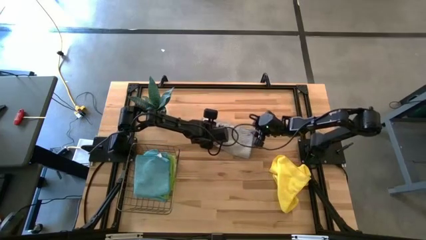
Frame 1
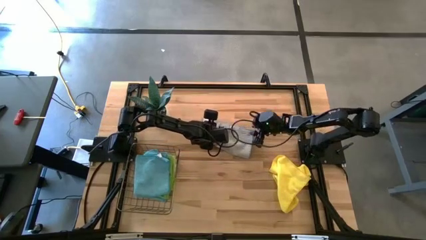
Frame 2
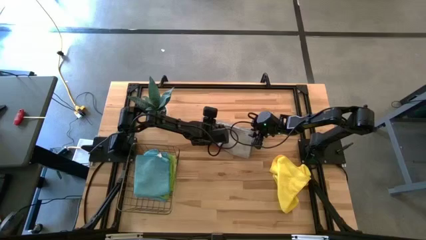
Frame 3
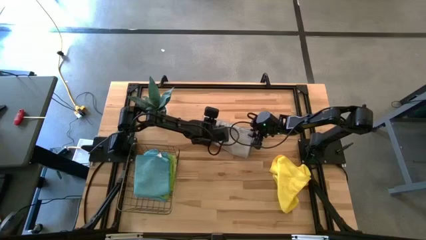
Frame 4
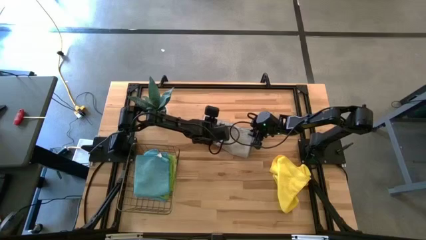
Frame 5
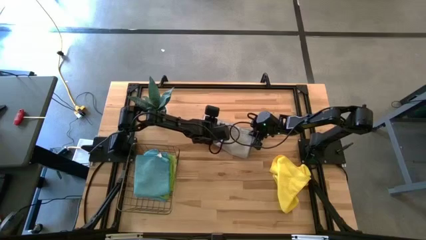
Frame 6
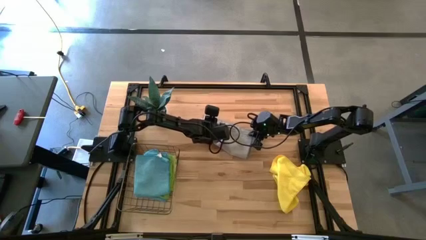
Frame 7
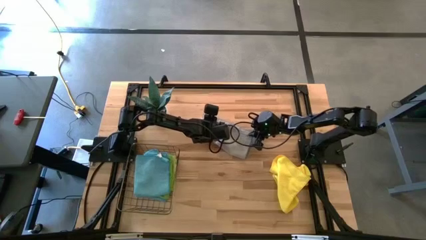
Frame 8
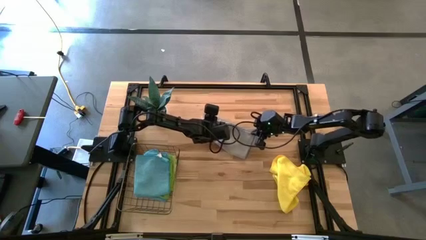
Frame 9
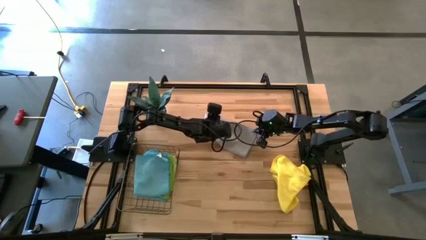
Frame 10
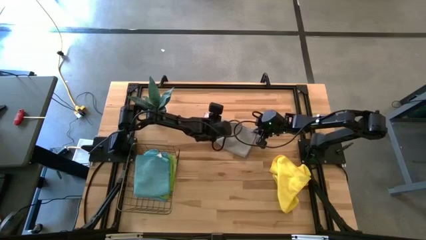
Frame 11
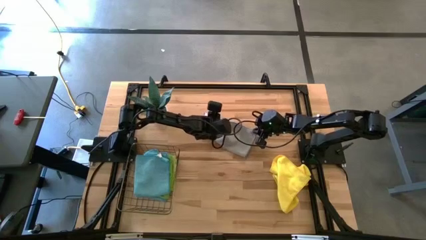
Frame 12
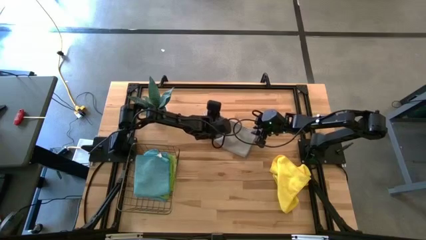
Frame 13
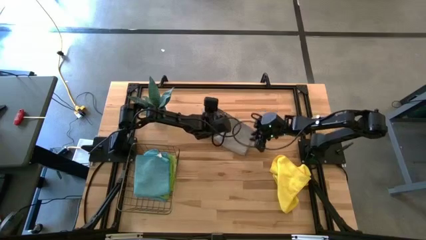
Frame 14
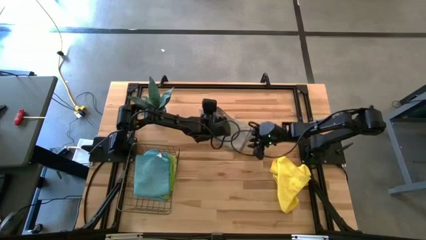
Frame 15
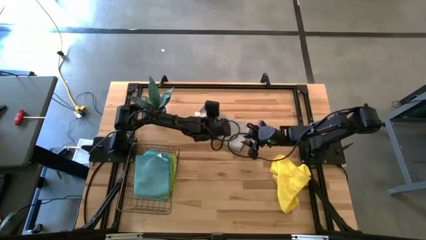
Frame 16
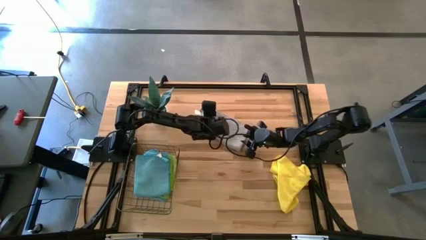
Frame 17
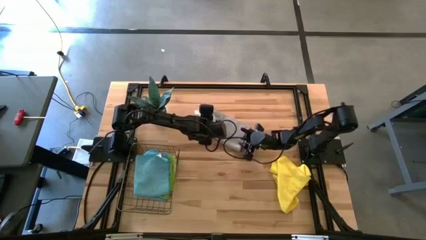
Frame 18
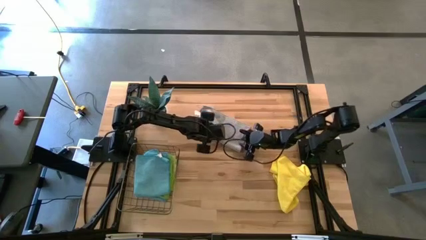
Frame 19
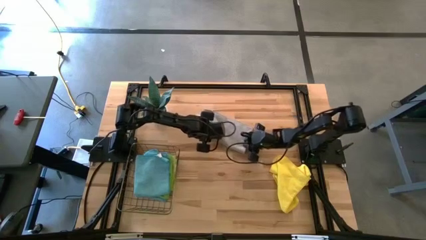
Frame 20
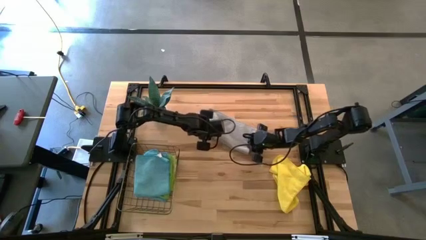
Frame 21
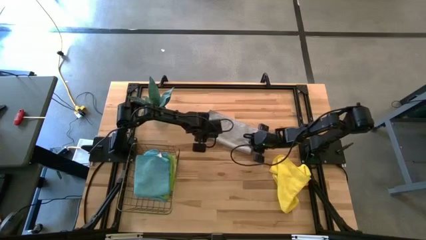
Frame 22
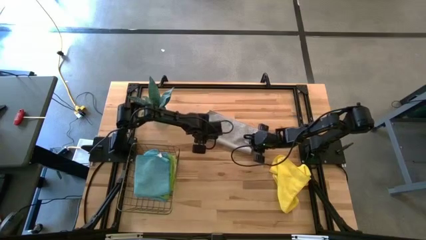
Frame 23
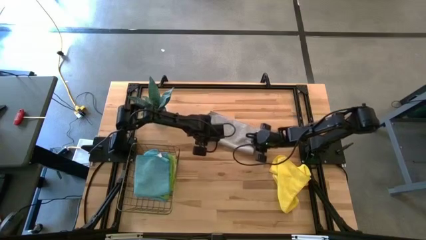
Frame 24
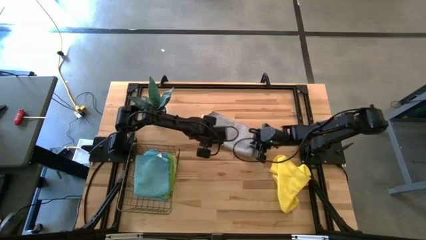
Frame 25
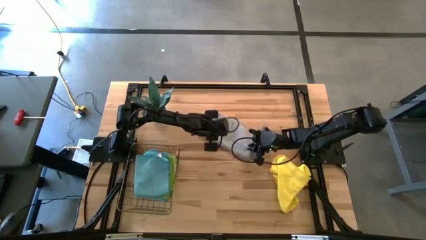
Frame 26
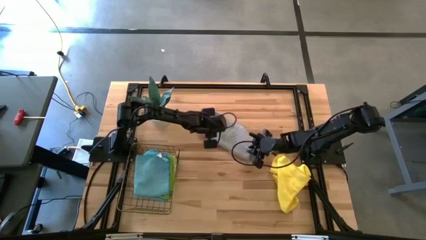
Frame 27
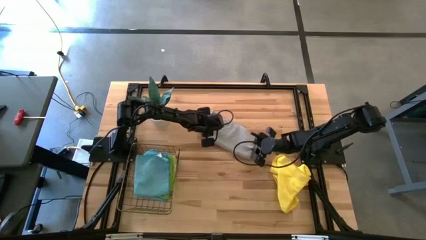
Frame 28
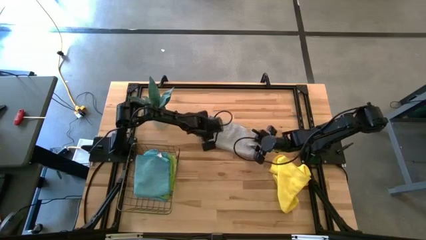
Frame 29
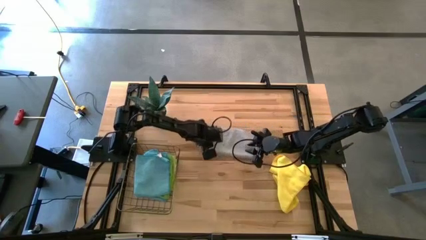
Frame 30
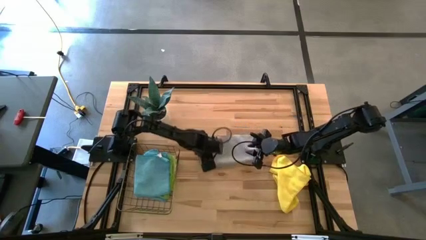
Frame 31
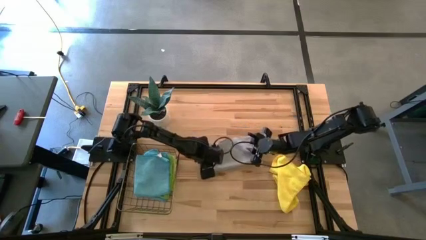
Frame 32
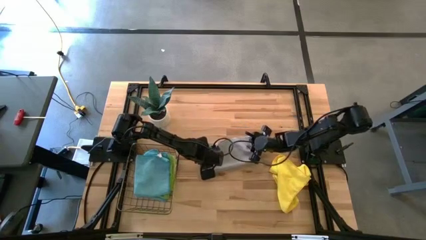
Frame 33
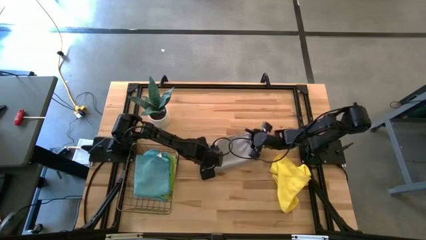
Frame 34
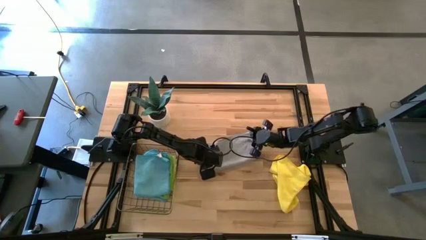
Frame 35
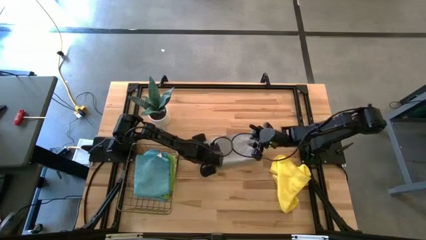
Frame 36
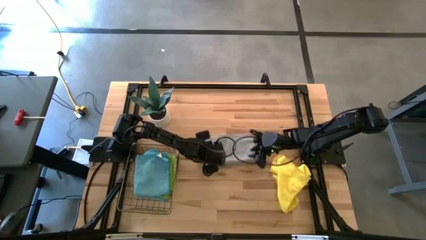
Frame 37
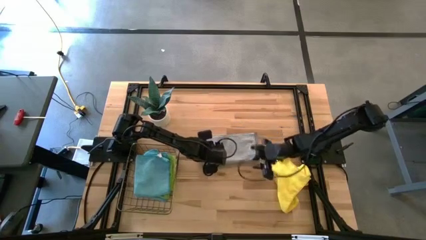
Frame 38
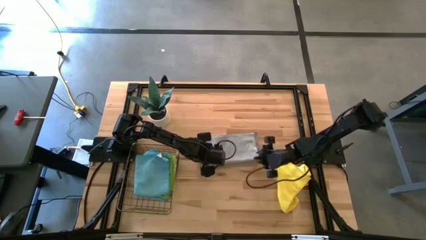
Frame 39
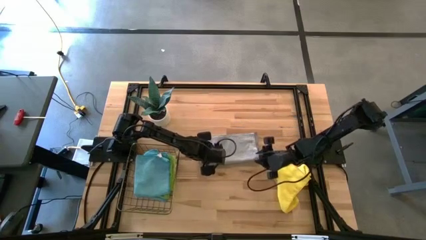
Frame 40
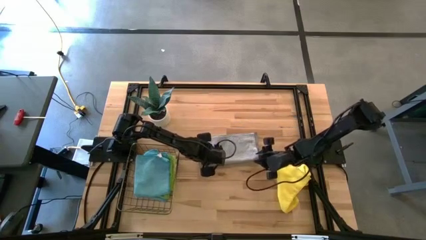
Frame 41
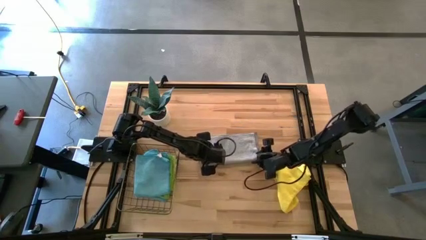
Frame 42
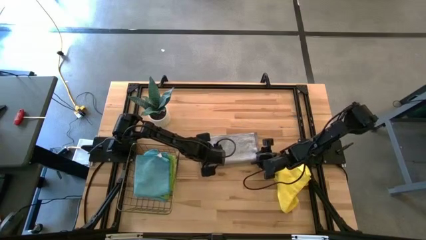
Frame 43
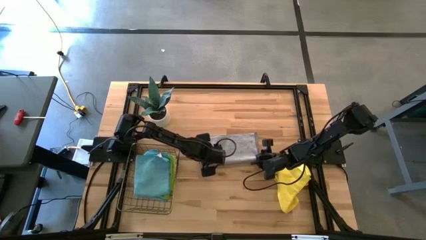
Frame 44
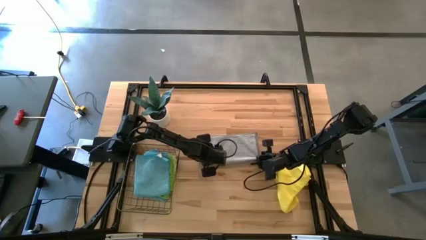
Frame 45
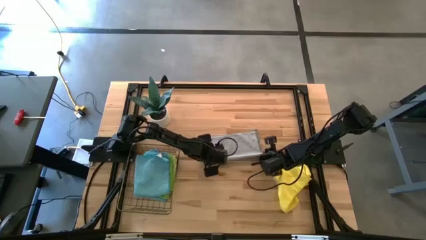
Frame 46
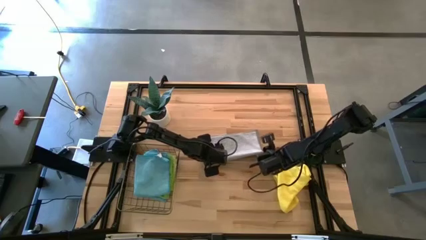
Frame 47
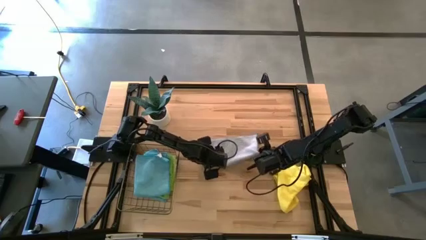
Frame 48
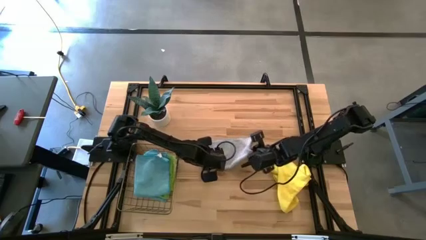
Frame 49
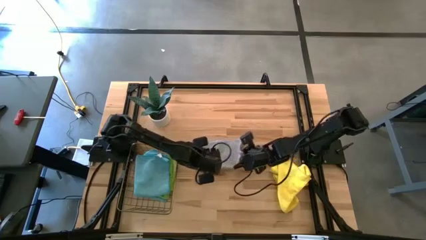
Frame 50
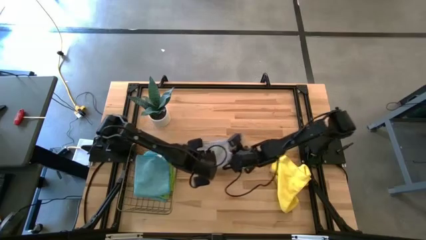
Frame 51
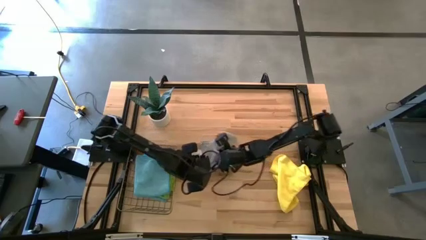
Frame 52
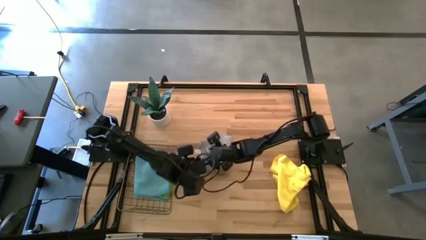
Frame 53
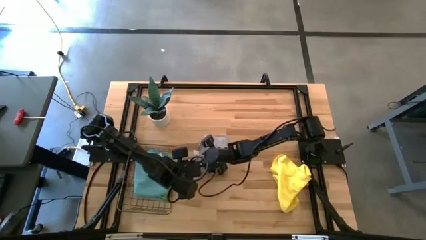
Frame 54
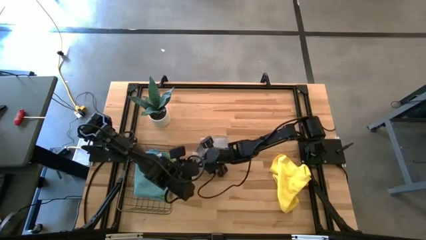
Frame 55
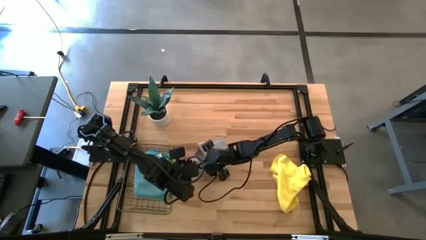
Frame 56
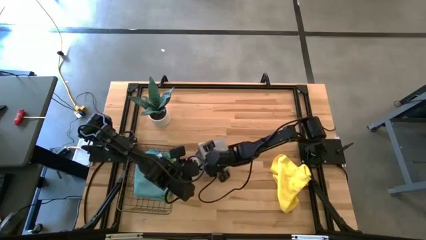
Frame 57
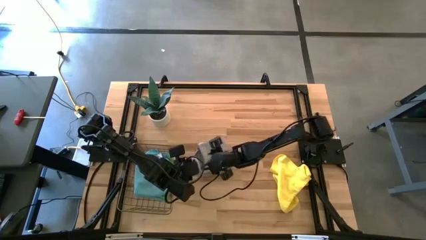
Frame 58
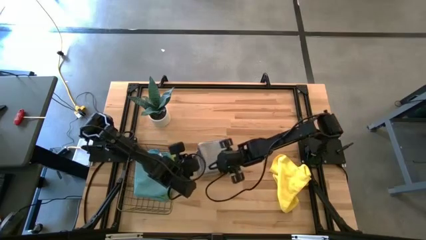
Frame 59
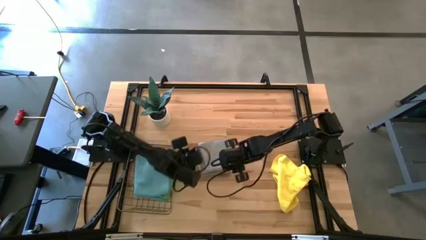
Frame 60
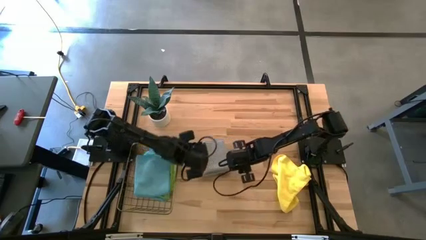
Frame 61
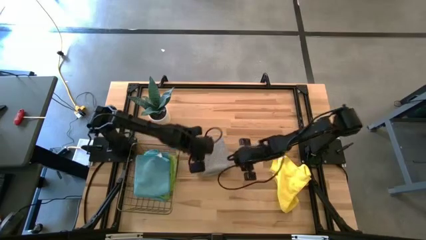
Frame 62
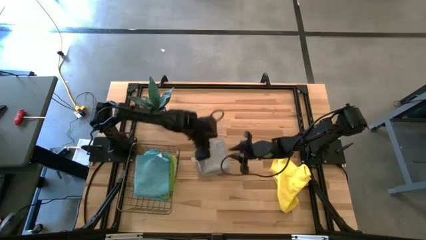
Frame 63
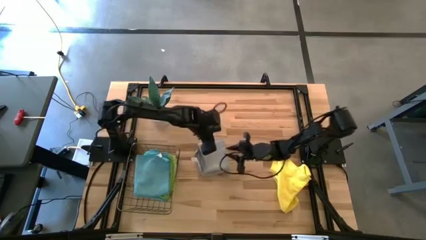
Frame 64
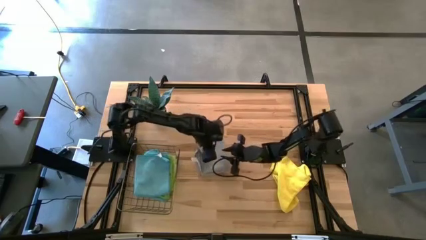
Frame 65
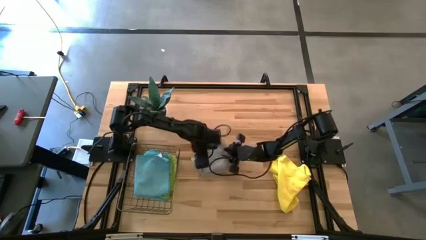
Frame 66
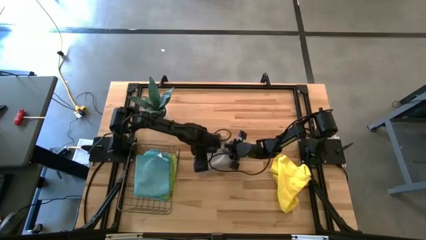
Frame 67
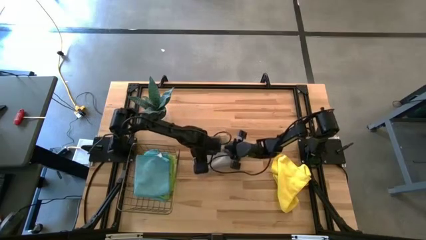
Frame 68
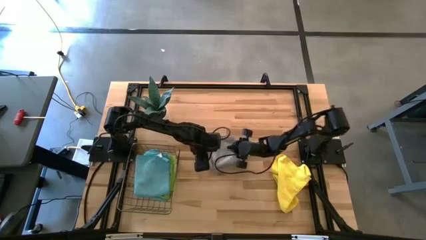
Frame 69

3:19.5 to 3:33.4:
Task: Fold microfiber towels
Fold the gray microfiber towel
